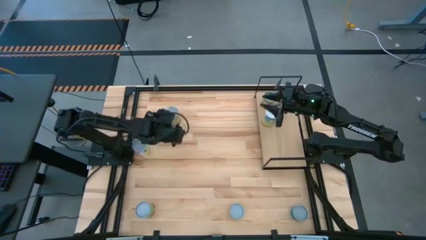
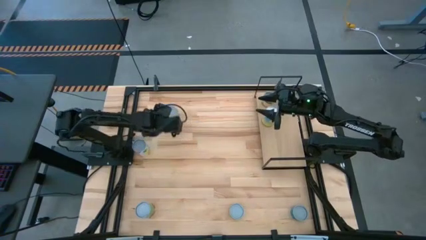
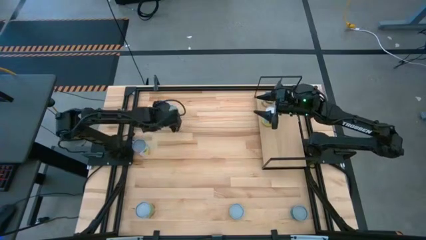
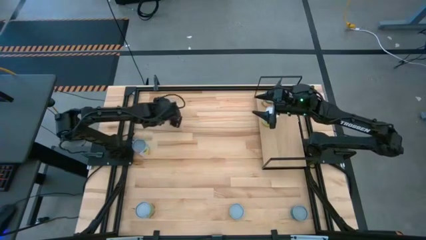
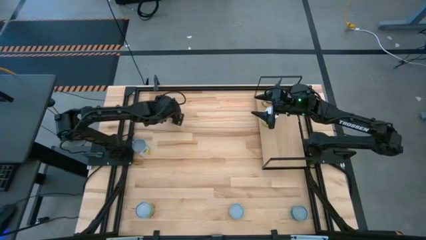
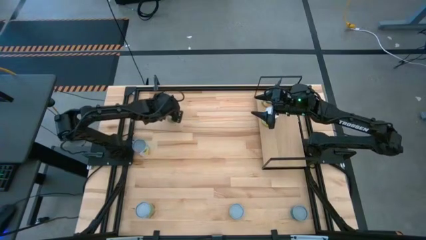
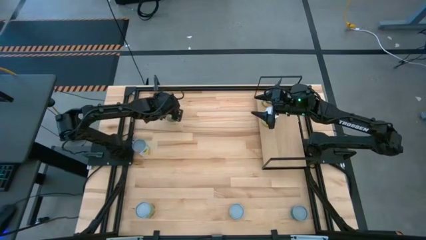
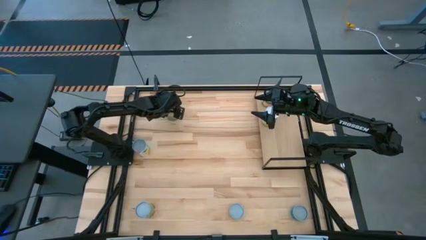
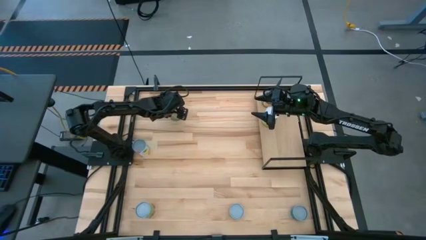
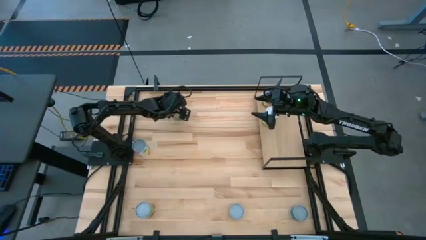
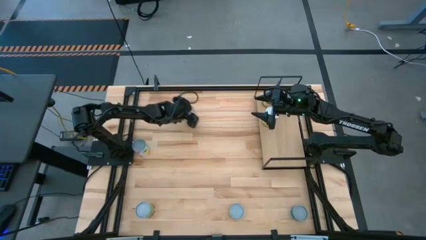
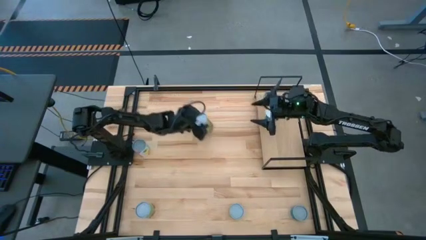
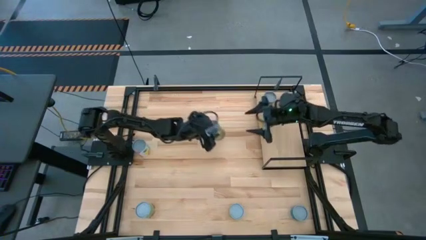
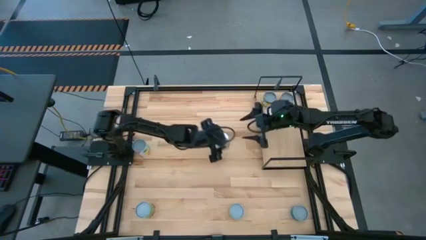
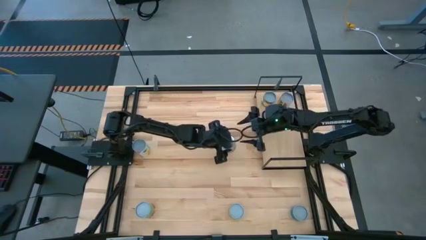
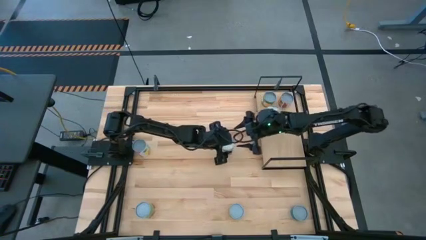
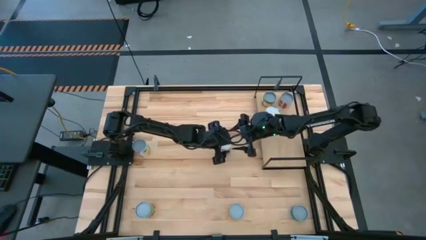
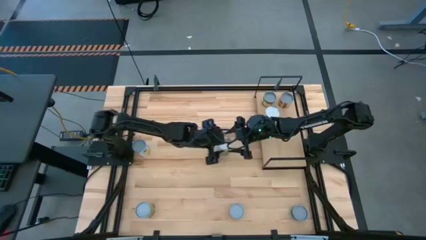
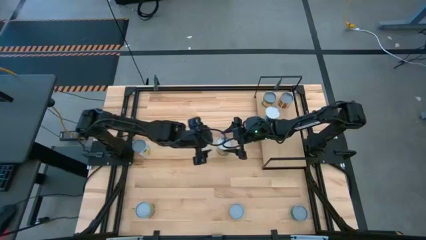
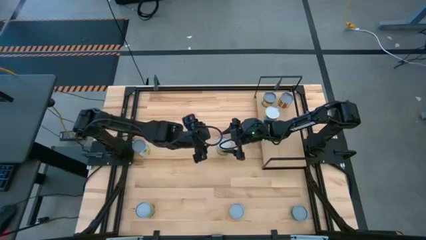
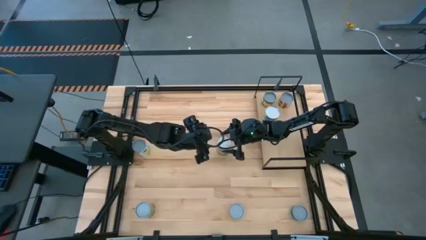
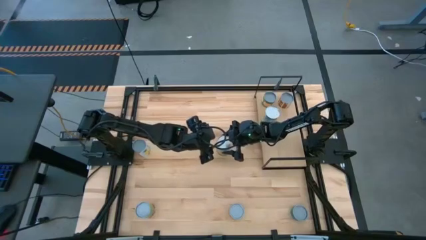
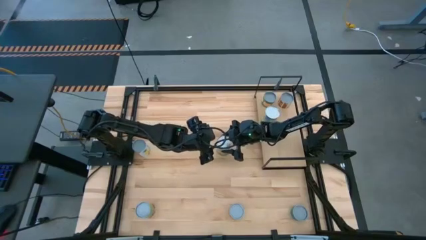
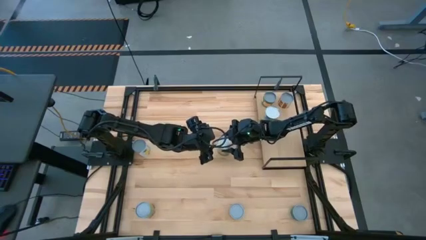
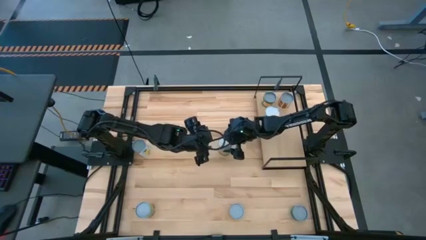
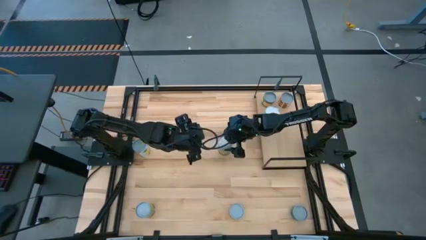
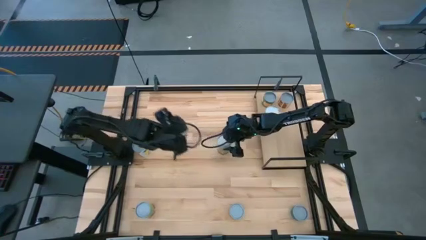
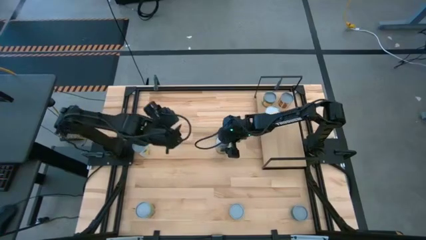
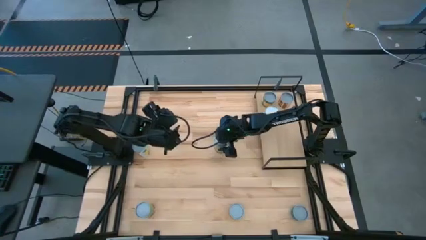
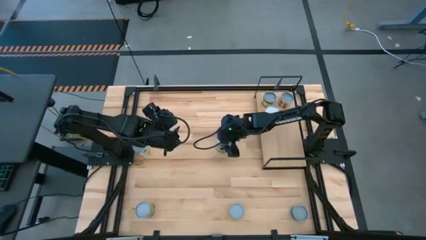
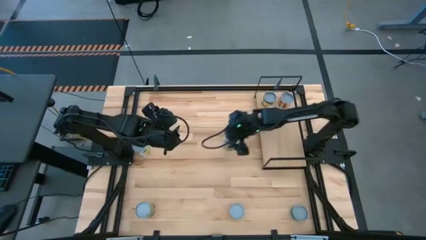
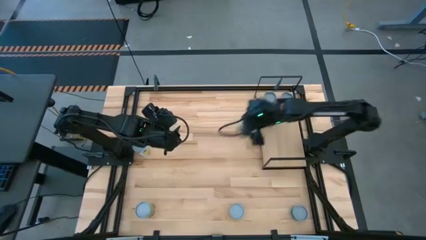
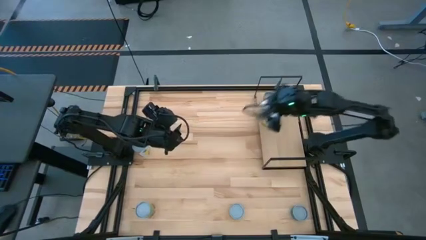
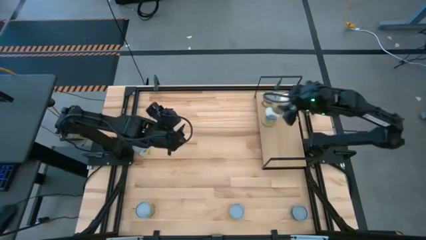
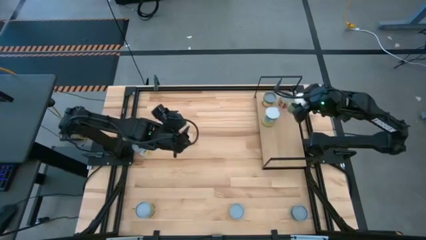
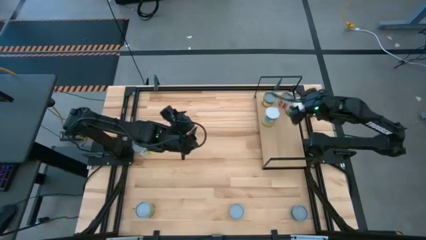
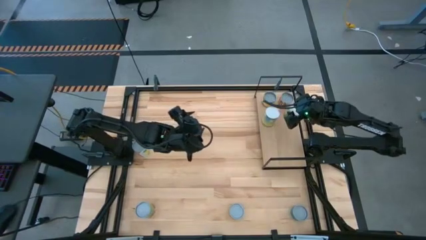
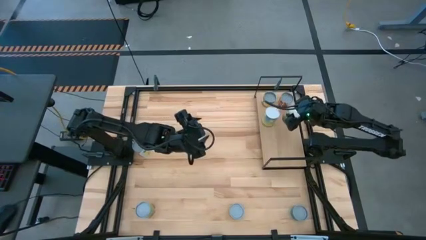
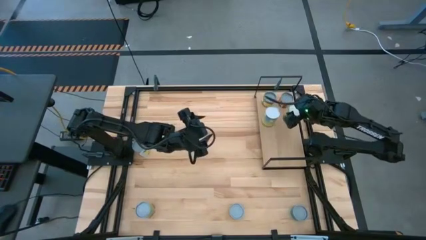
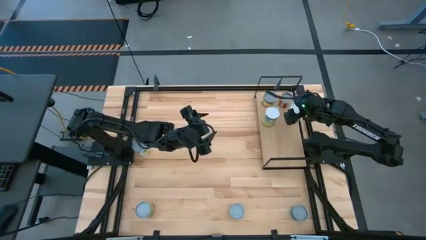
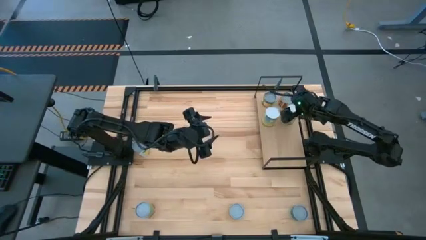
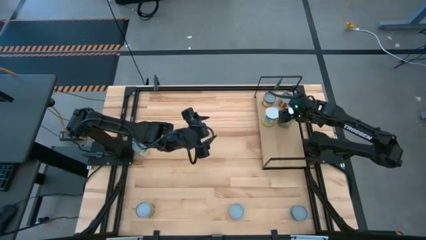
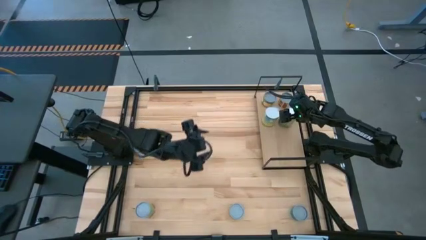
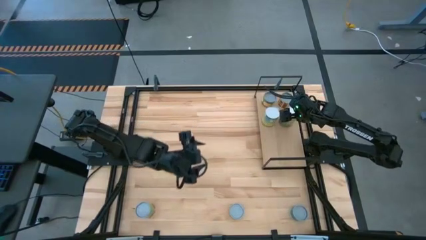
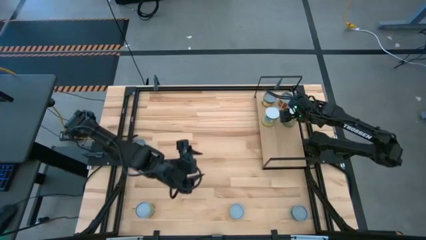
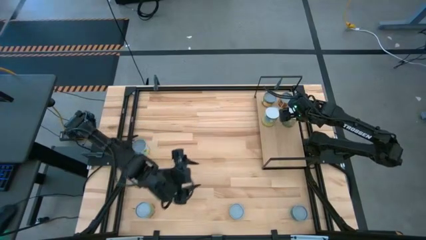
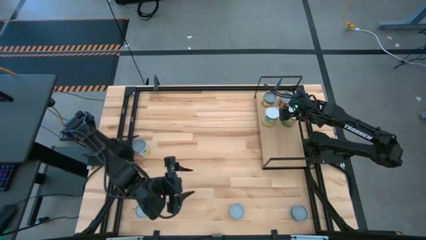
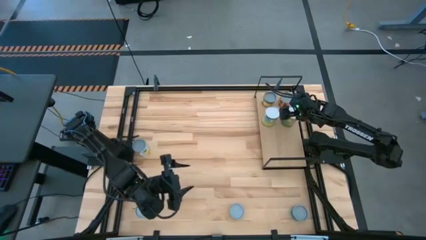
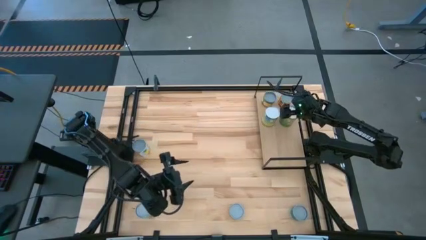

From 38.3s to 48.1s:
Task: Pick and place cans onto a shelf
Put the canned oranges on the shelf

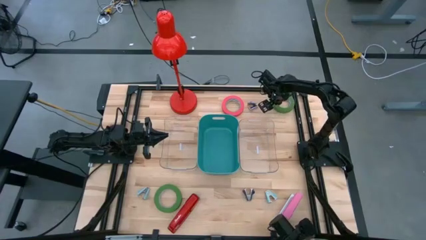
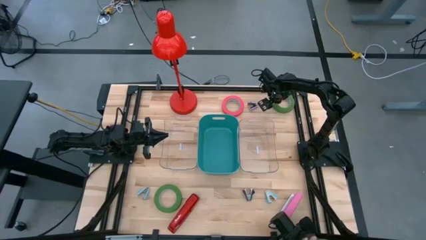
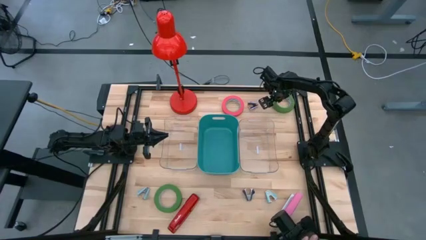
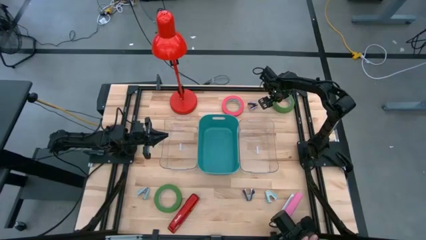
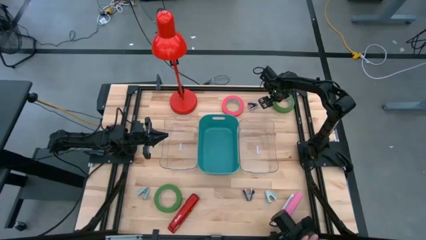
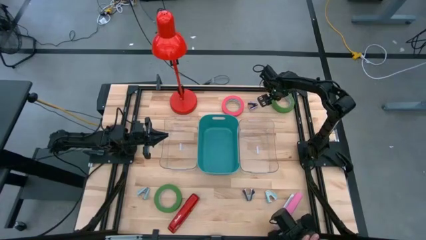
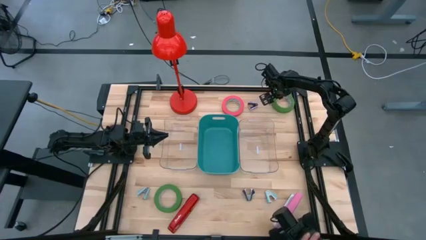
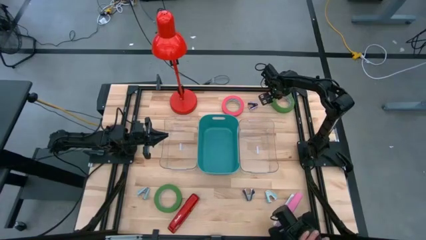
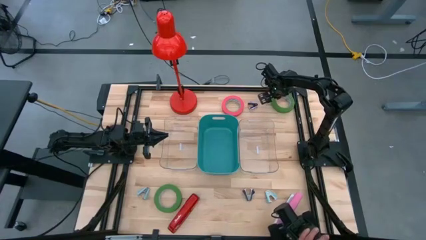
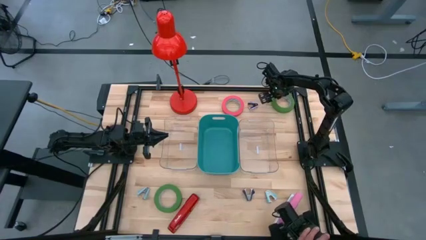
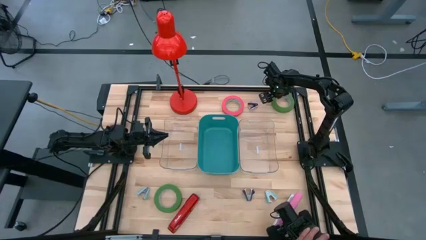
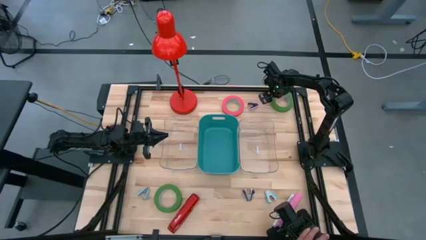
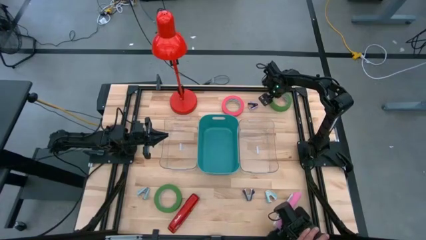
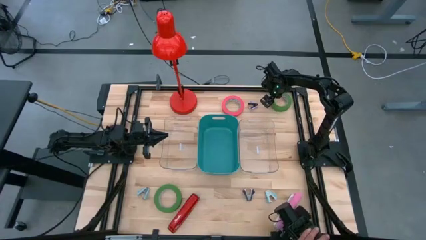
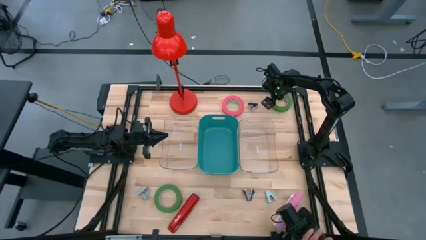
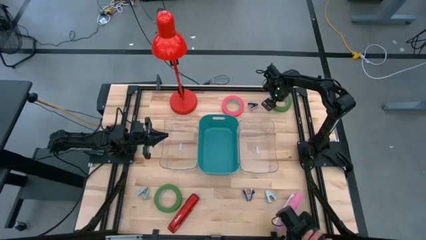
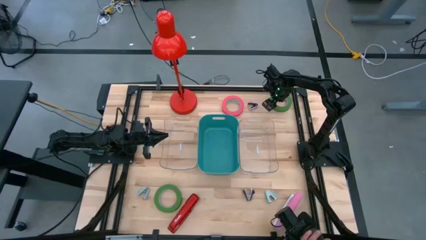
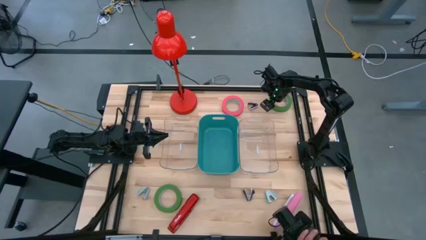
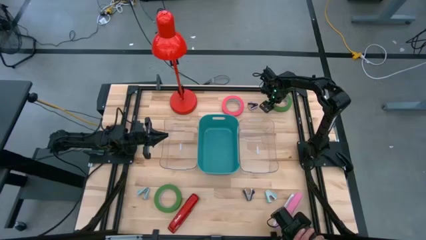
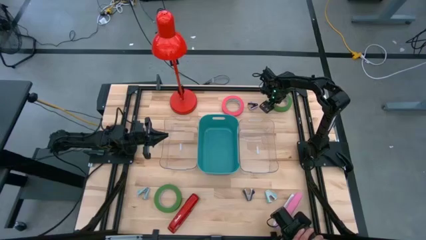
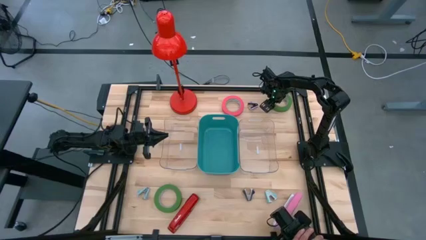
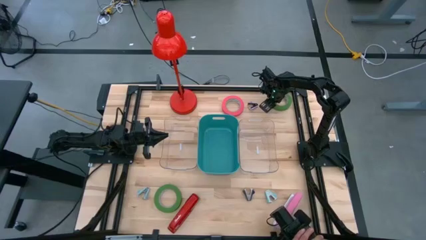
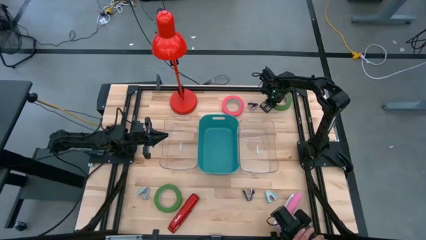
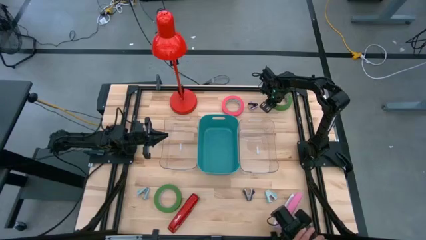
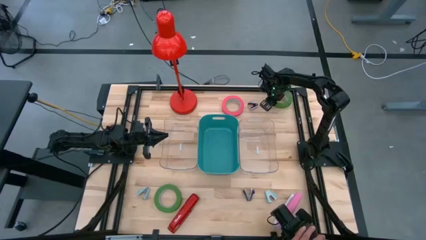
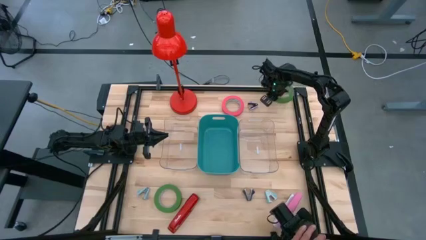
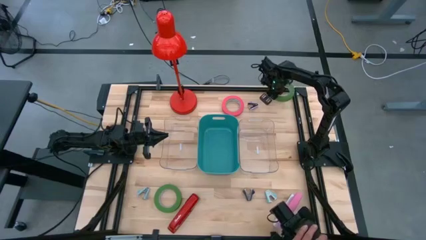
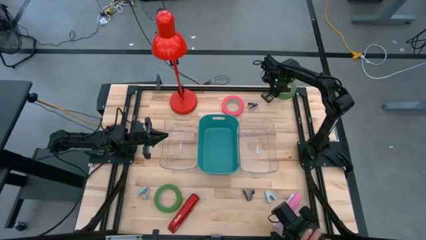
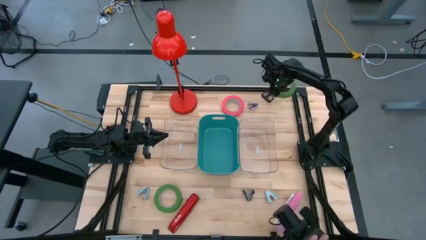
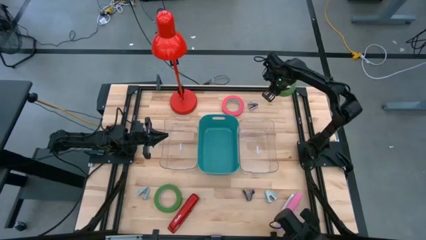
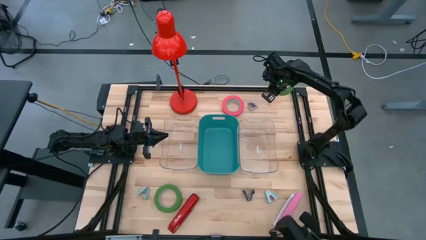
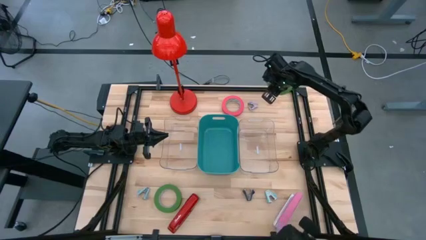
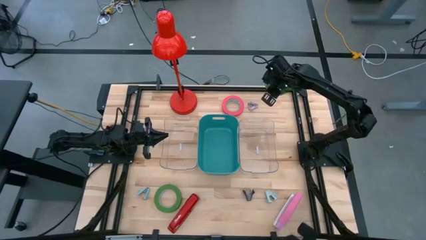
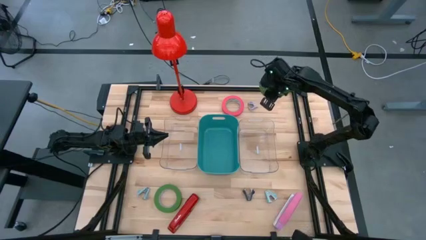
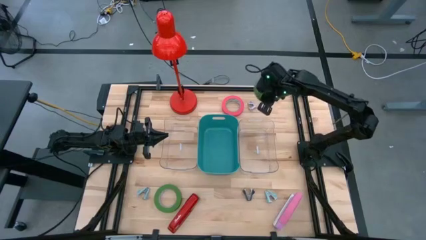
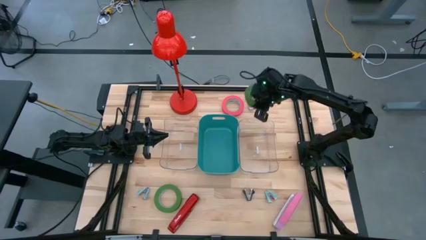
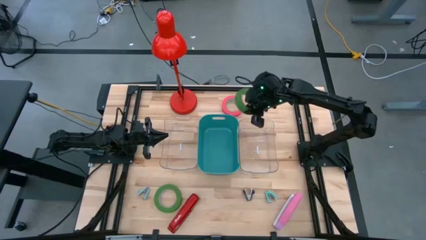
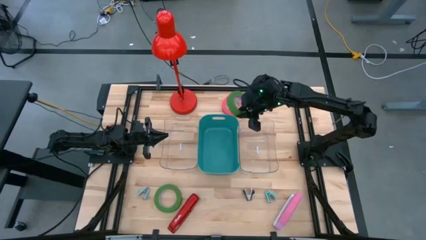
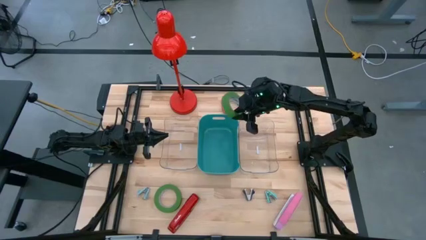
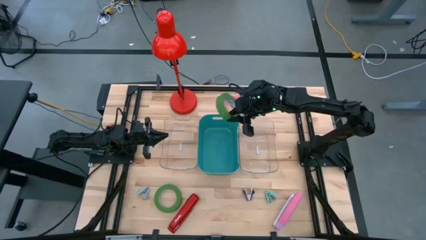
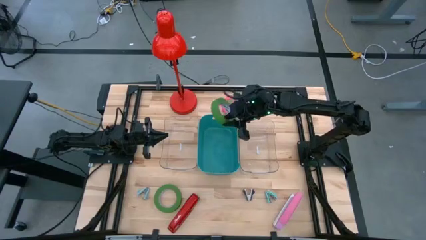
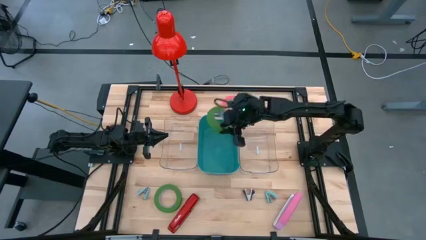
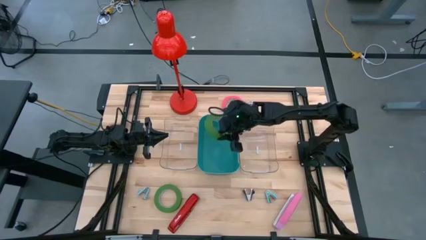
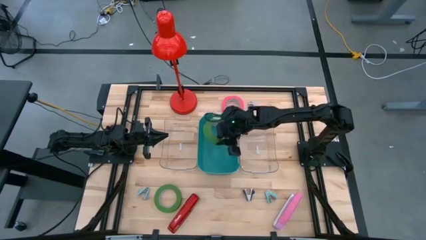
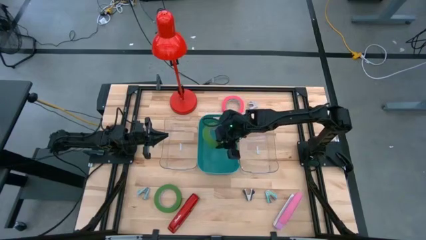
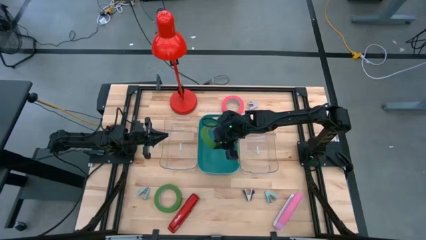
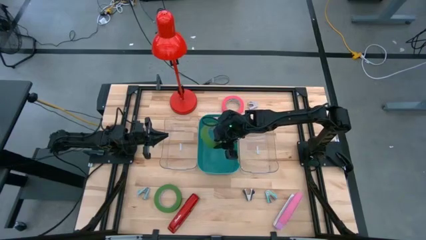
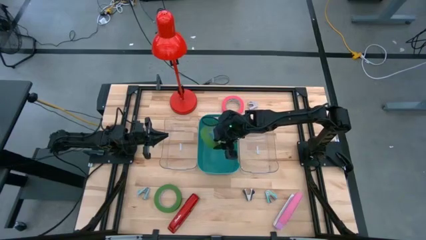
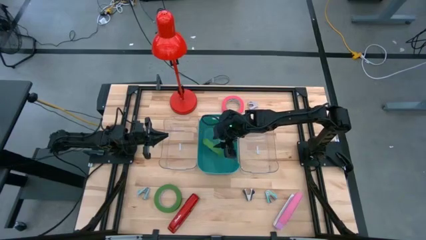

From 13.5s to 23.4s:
Task: Pick and place Stapler, Stapler remover, tape
Put the top green tape into the green bin
